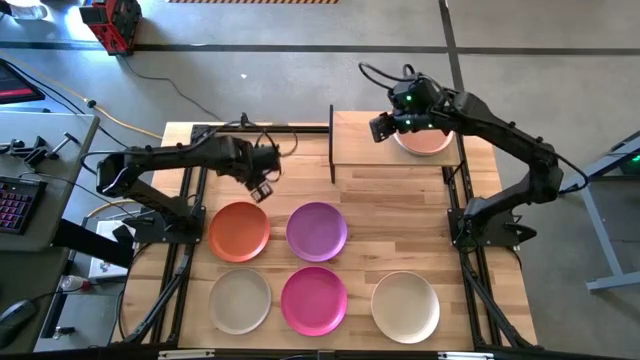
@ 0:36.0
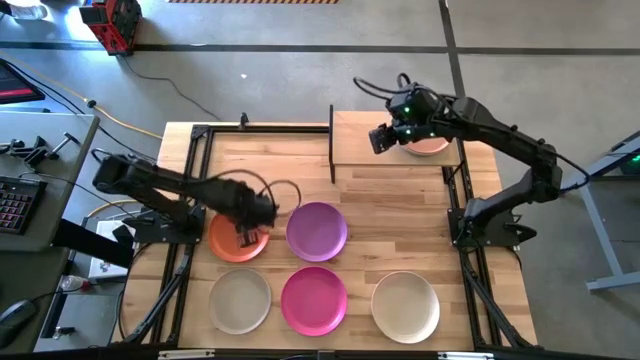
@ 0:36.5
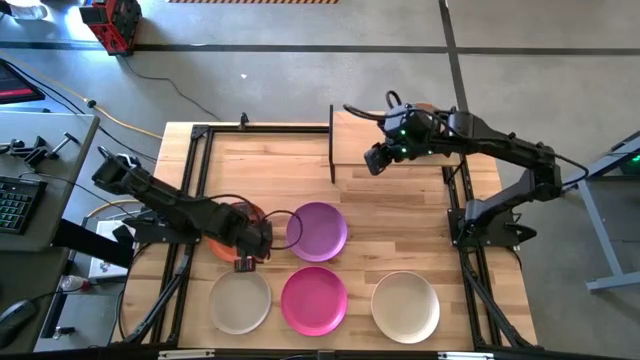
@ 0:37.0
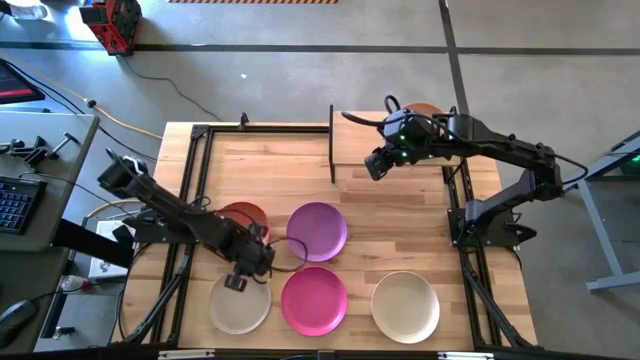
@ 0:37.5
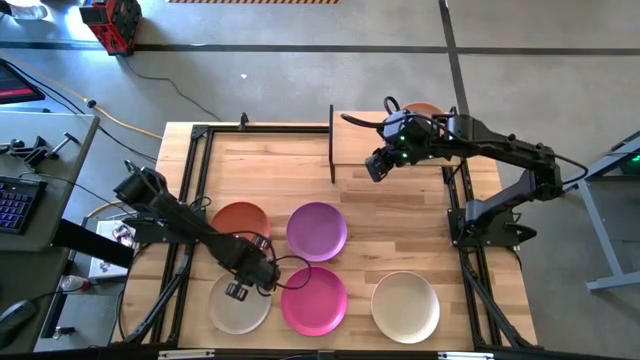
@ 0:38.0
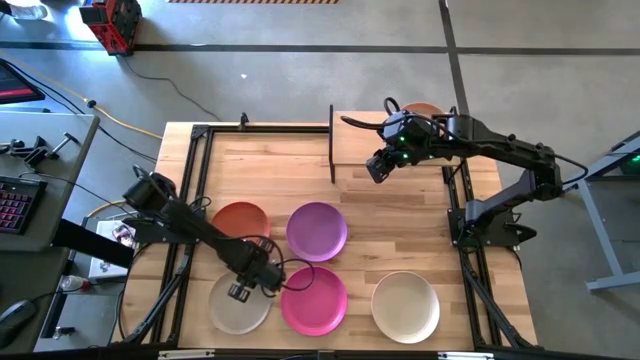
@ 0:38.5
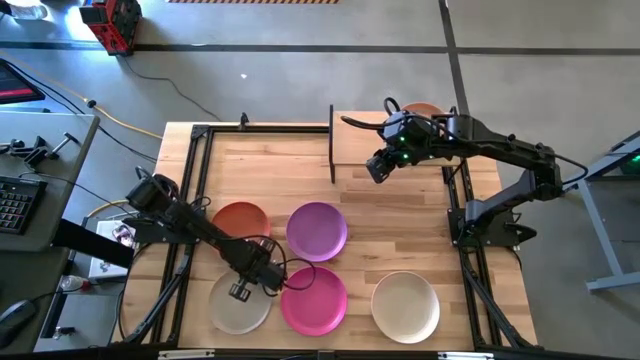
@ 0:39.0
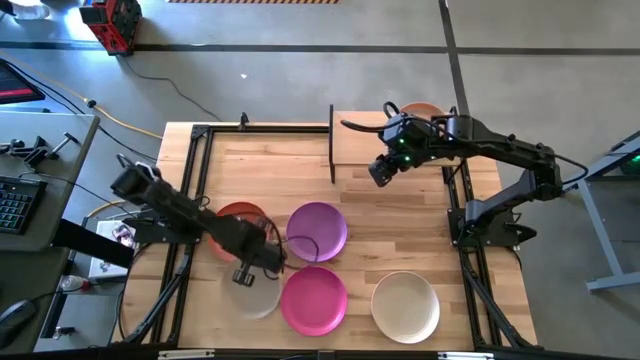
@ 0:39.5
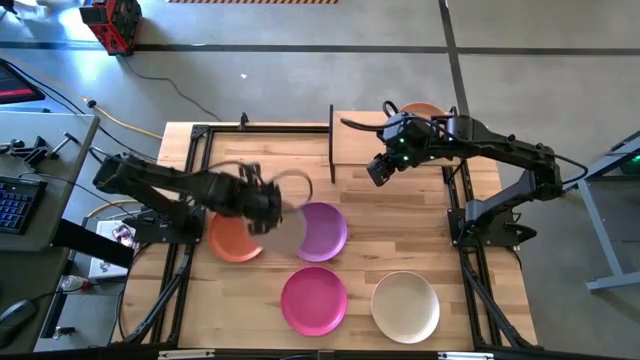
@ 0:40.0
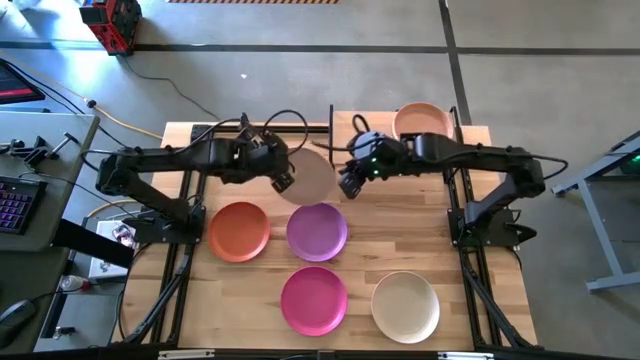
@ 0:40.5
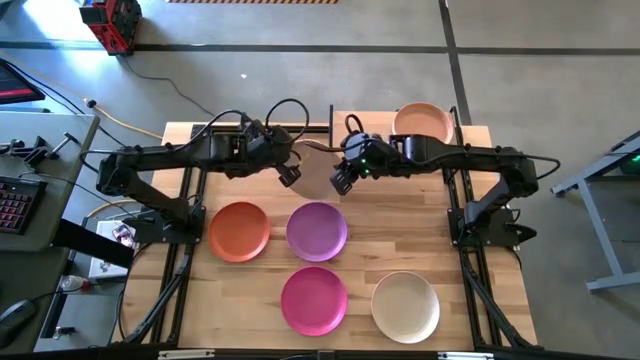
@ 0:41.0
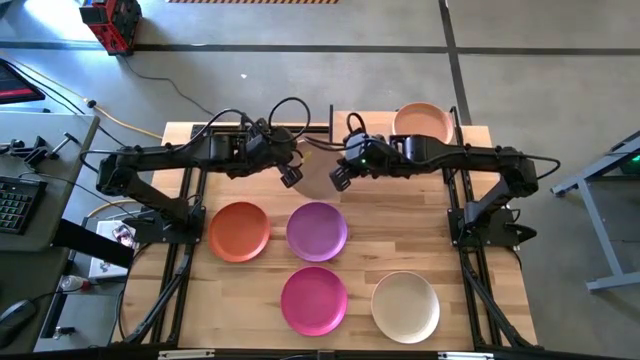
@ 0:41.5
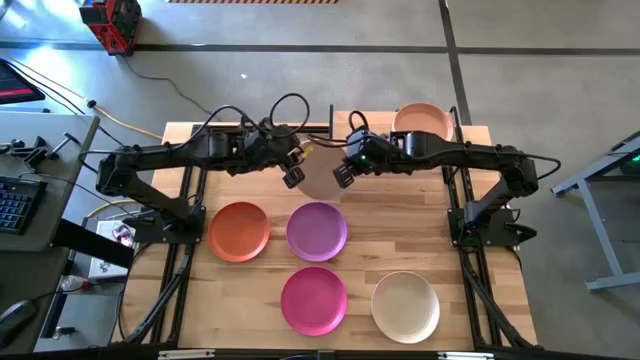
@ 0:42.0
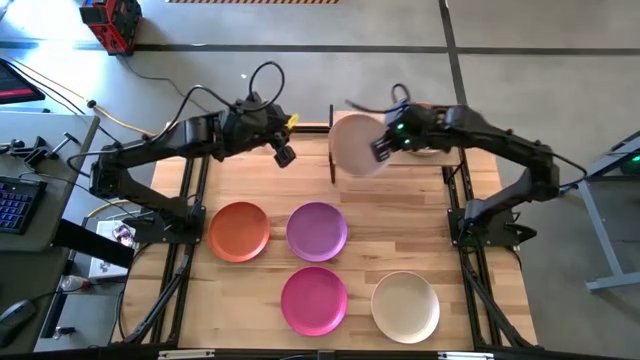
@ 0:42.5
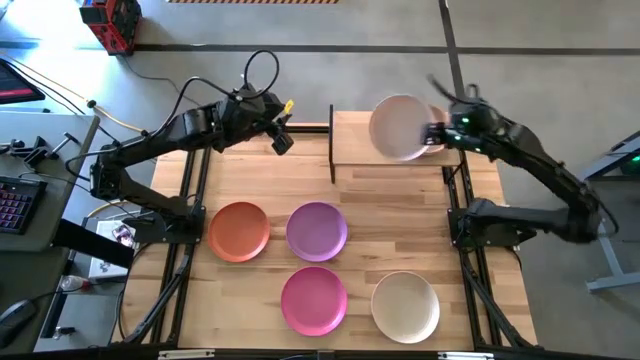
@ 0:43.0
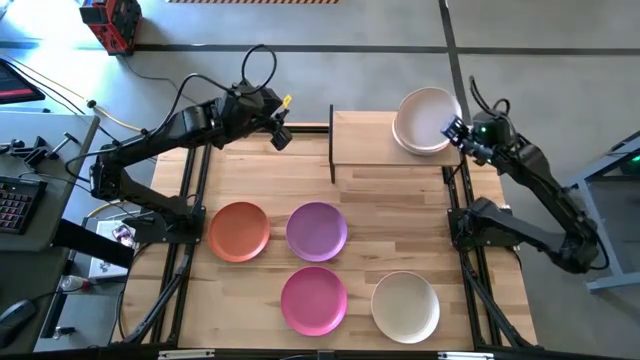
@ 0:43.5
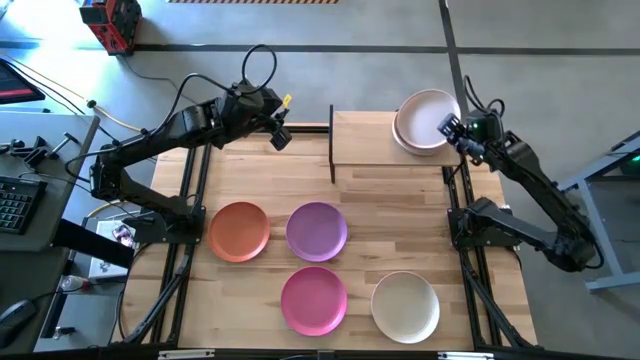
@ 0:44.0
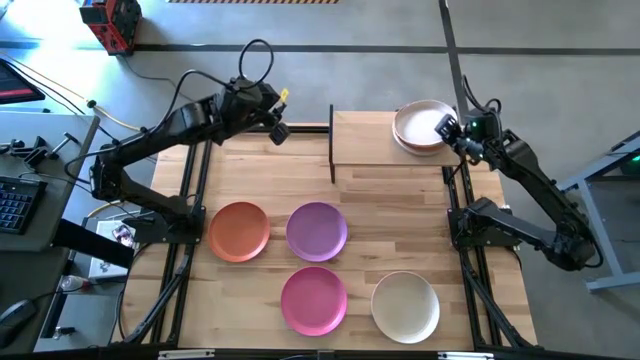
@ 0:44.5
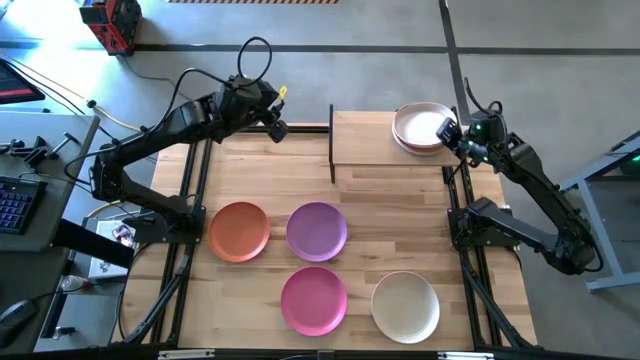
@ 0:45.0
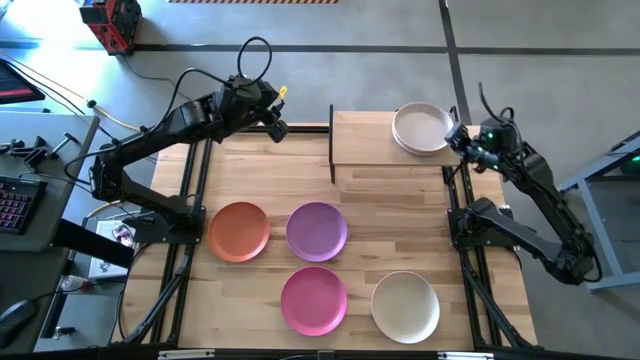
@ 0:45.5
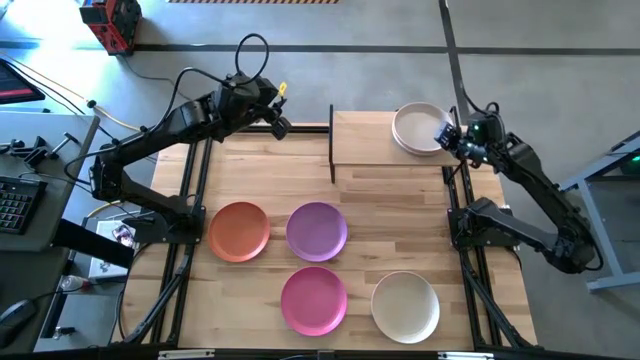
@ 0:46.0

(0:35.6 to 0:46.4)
Task: Place and stack plates onto a shelf
Stack the left white plate on top of the brown plate on the shelf

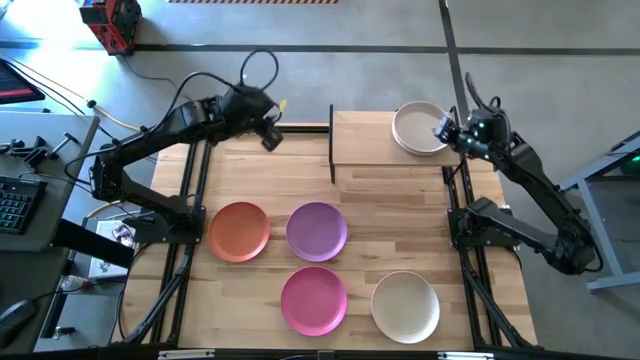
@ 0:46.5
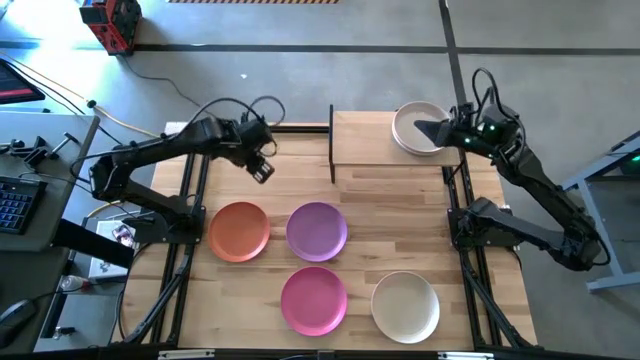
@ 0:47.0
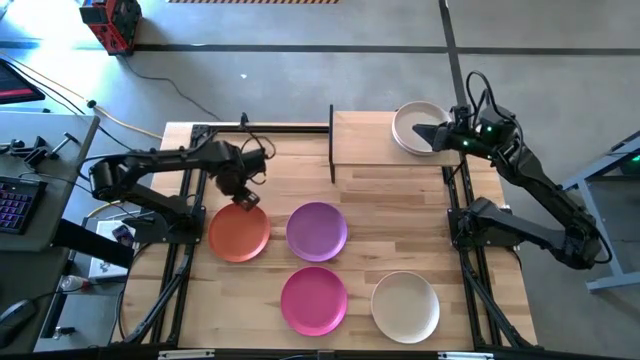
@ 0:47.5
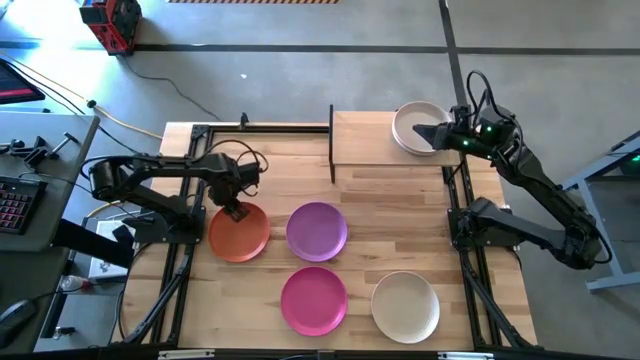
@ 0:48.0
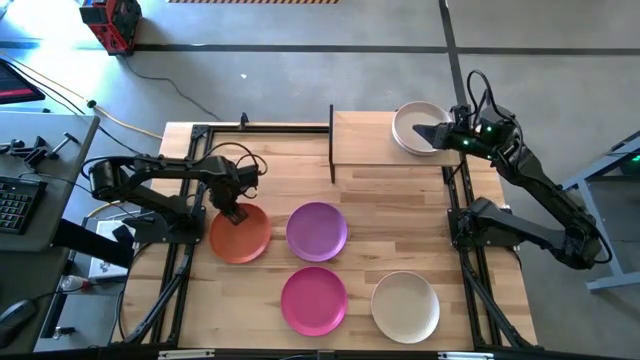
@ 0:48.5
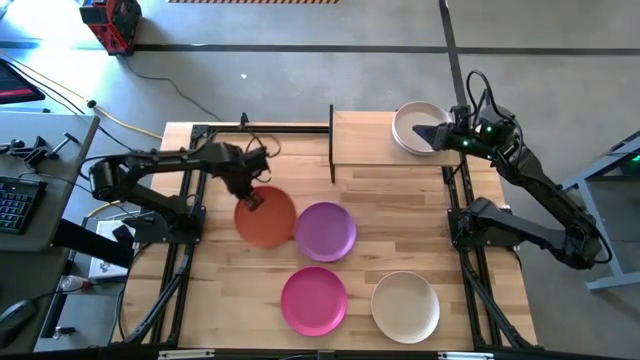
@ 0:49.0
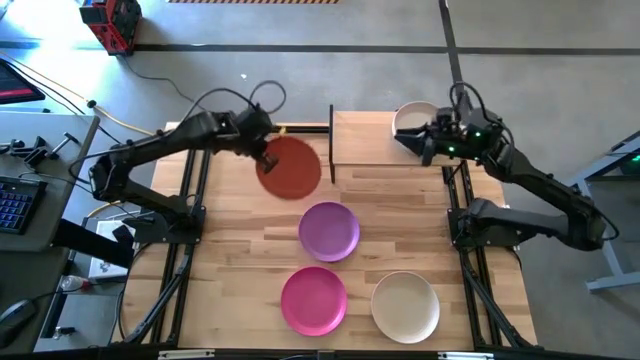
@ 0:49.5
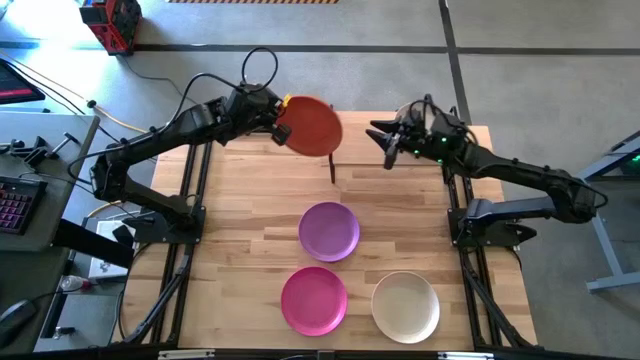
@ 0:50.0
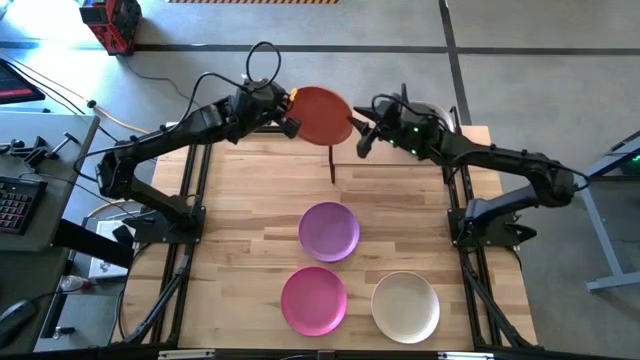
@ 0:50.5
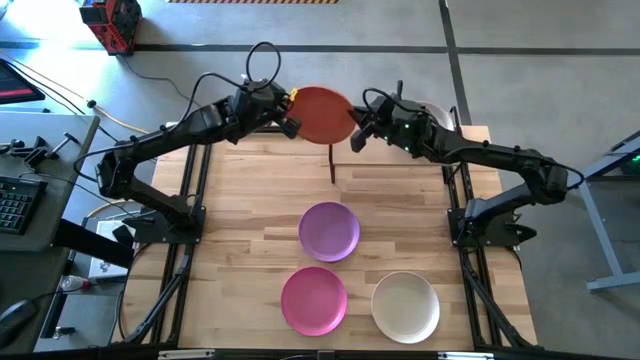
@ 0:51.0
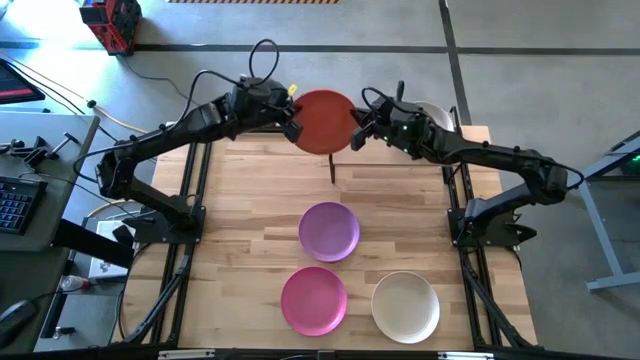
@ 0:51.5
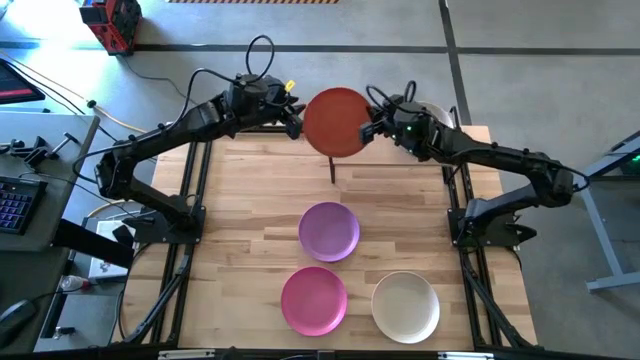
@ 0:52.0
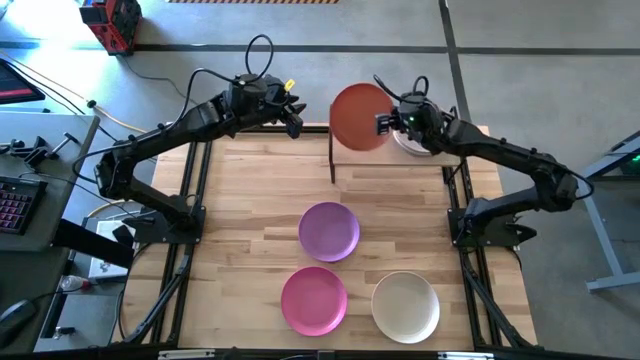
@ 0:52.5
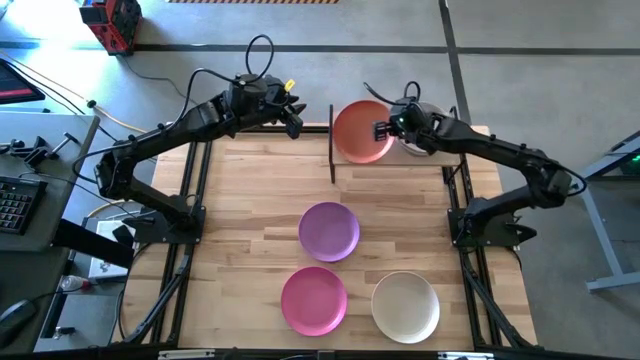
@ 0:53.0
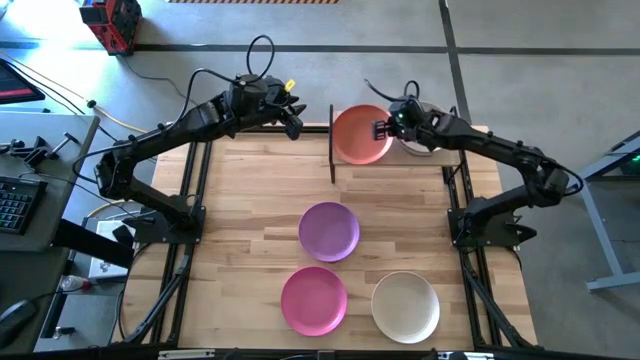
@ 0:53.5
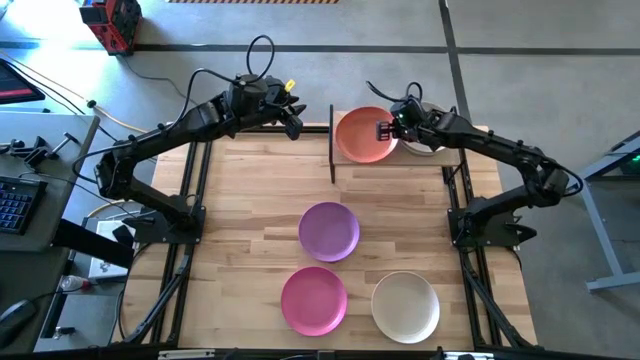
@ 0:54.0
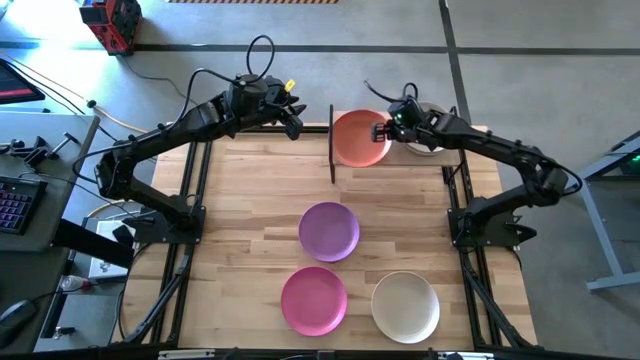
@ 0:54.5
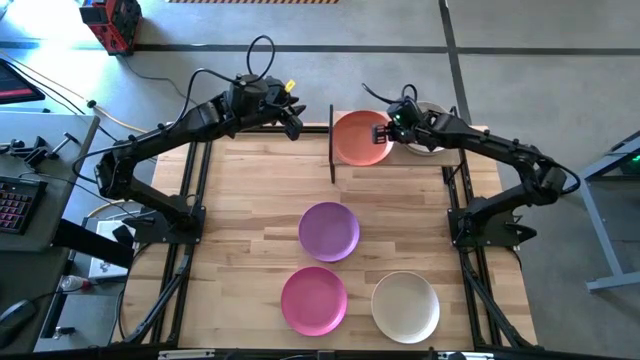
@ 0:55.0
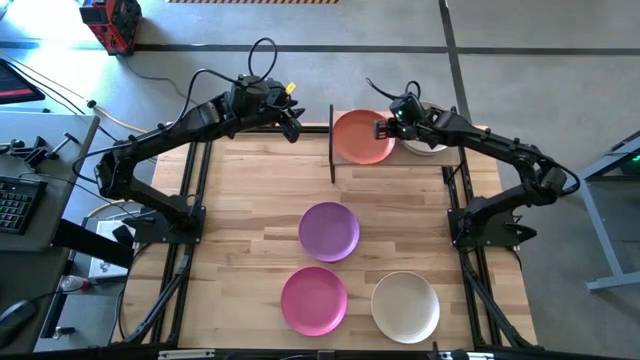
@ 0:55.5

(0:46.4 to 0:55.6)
Put the orange plate on the shelf
